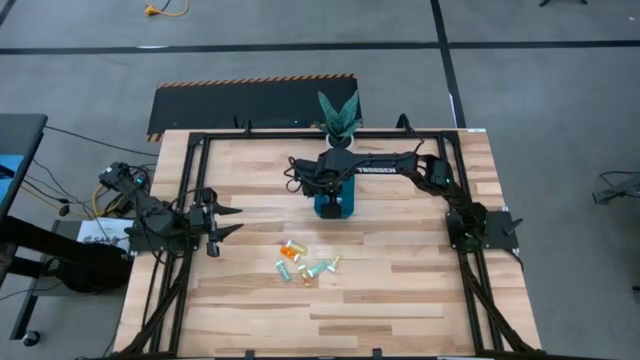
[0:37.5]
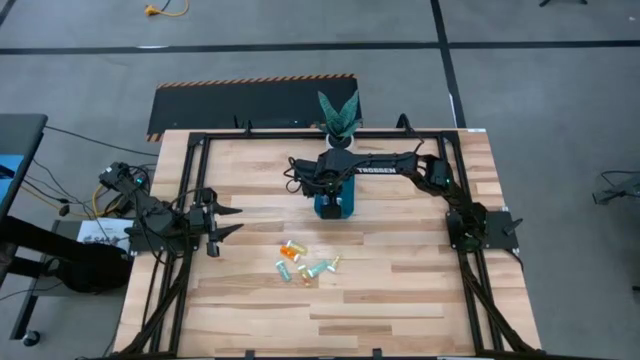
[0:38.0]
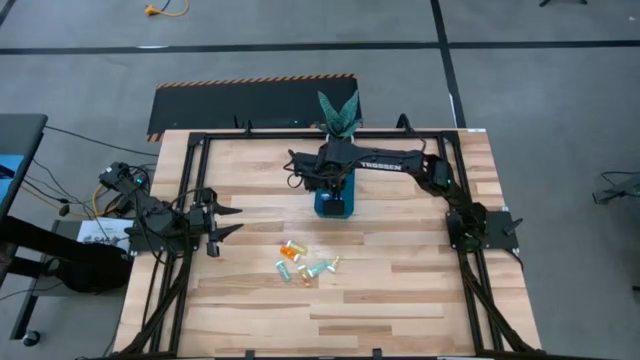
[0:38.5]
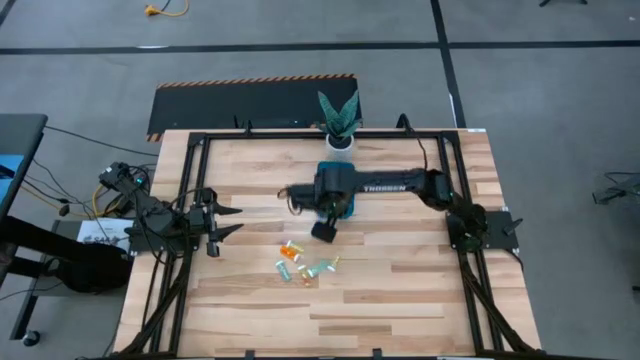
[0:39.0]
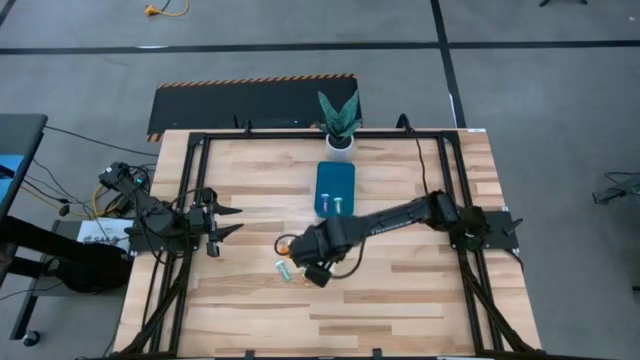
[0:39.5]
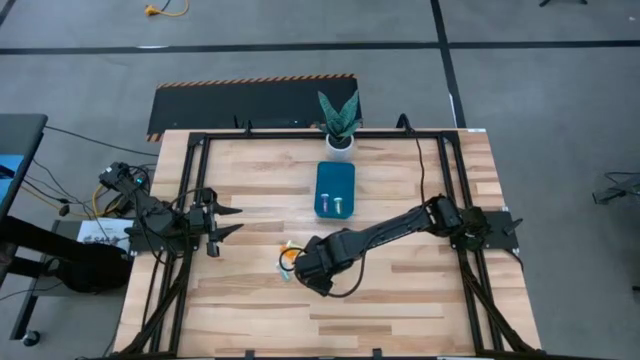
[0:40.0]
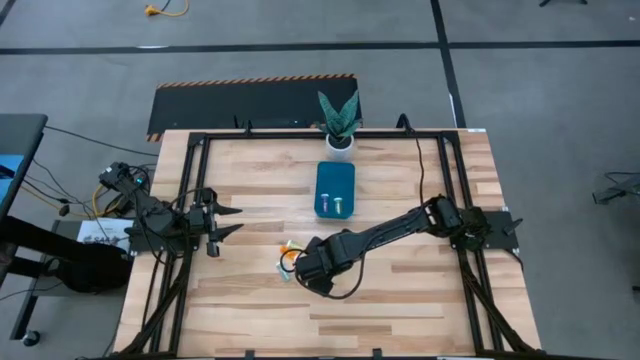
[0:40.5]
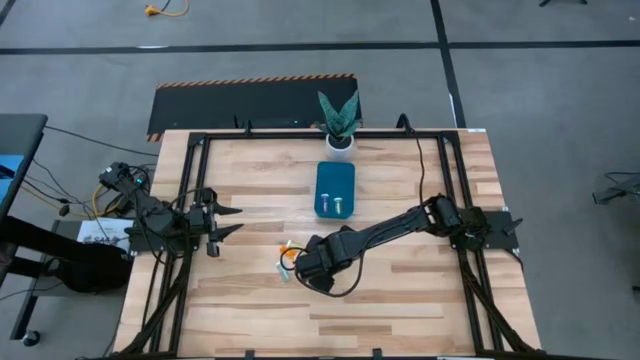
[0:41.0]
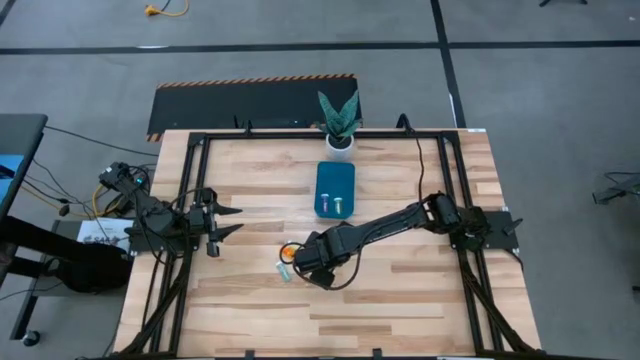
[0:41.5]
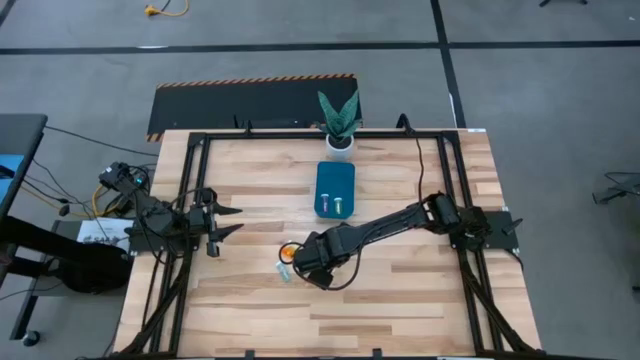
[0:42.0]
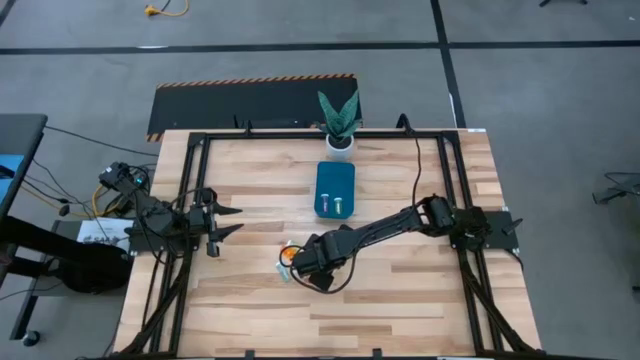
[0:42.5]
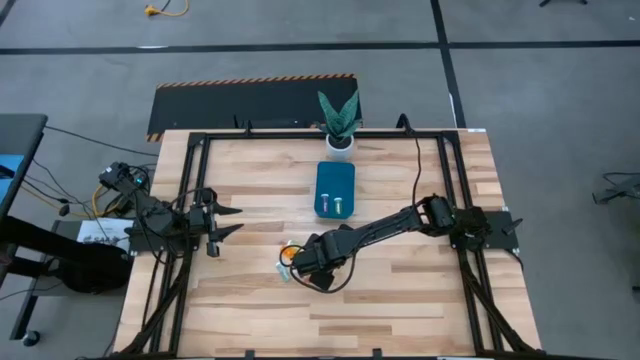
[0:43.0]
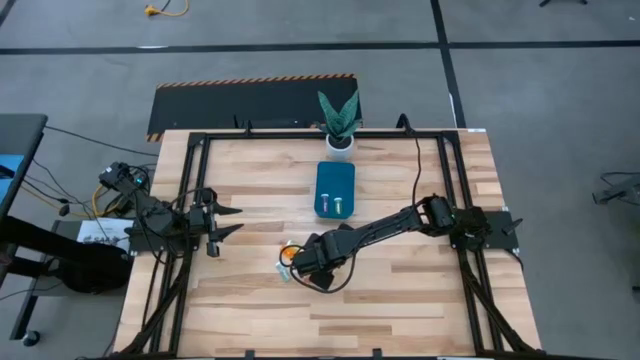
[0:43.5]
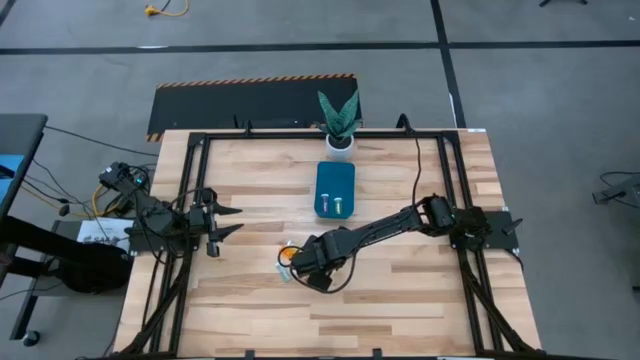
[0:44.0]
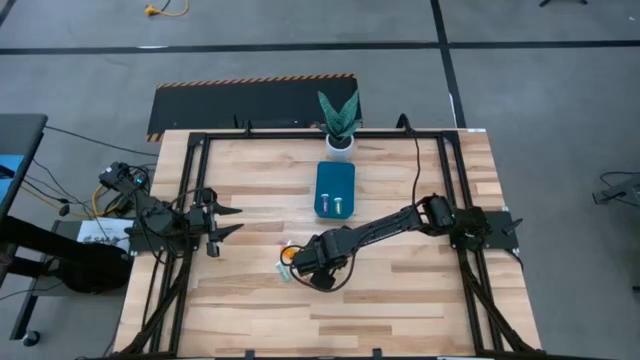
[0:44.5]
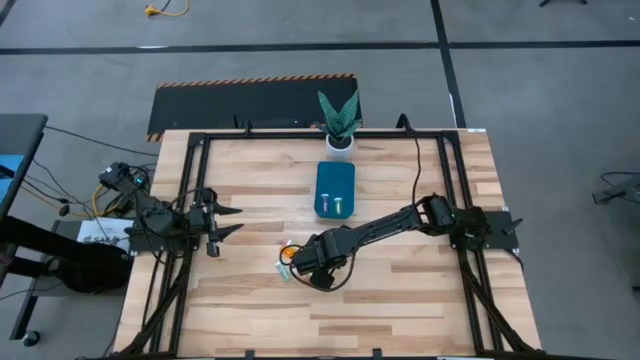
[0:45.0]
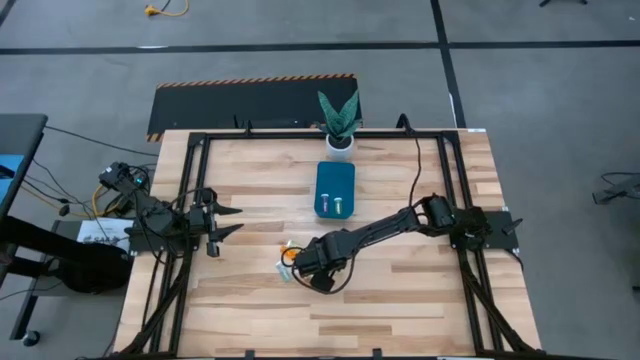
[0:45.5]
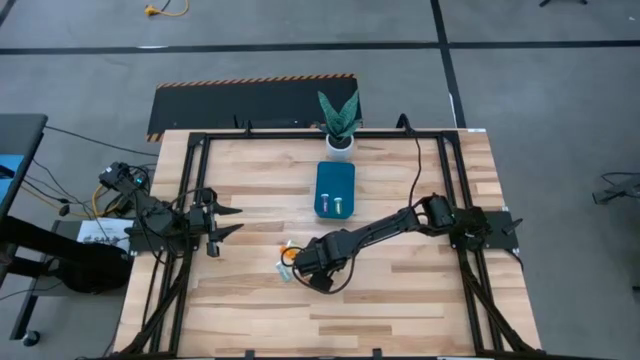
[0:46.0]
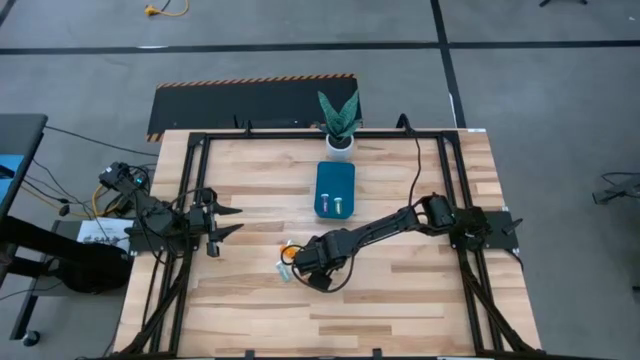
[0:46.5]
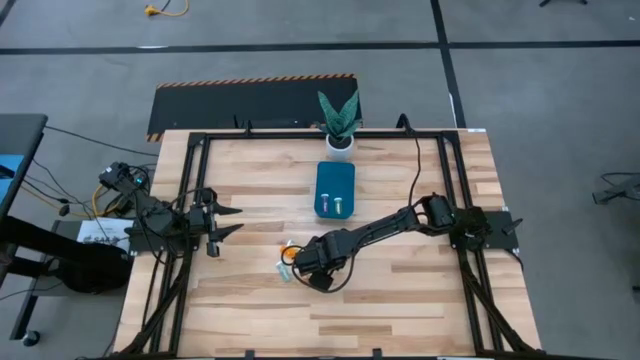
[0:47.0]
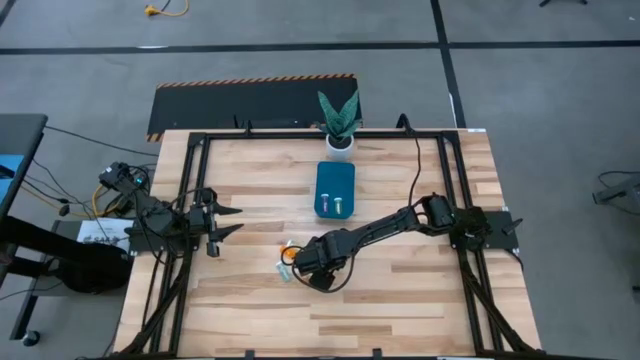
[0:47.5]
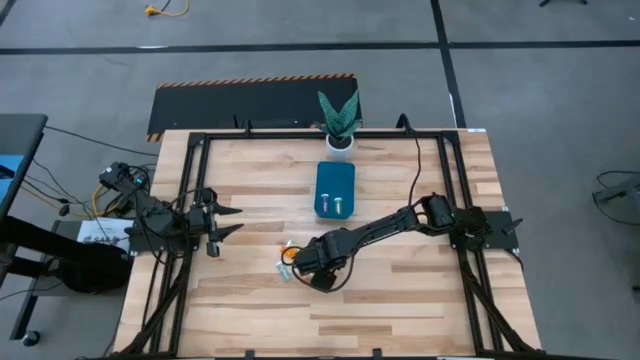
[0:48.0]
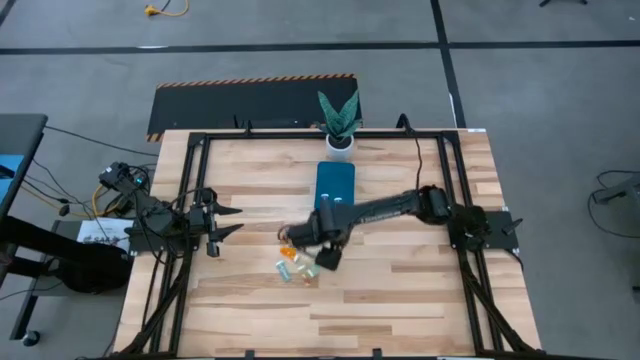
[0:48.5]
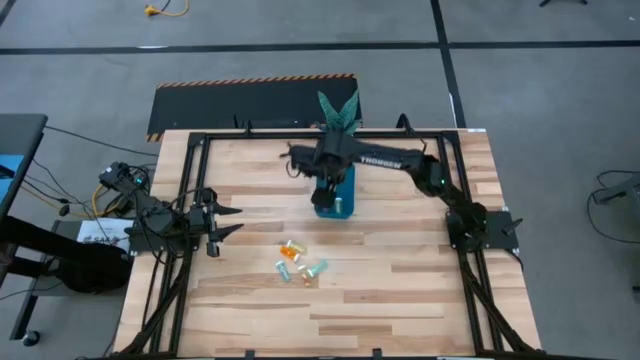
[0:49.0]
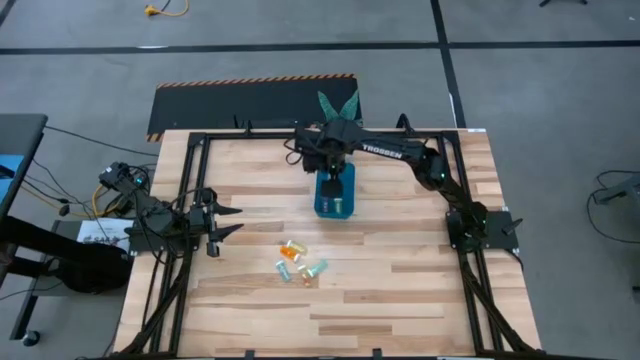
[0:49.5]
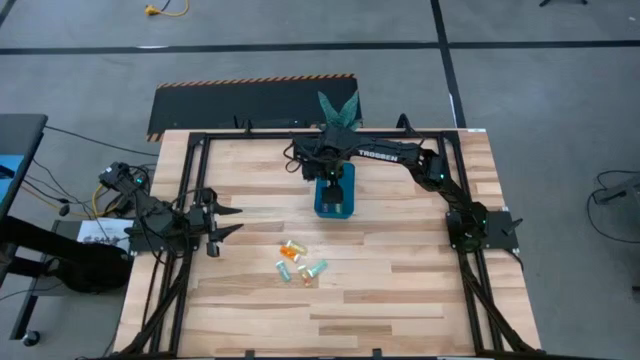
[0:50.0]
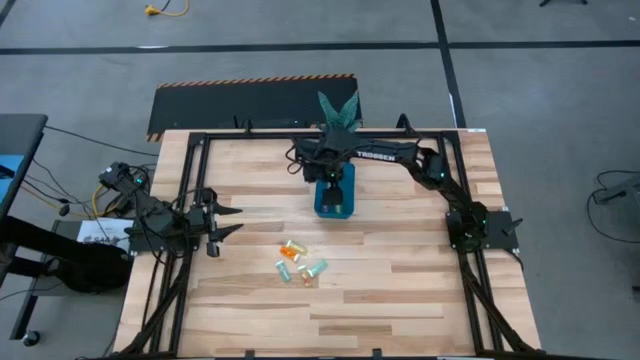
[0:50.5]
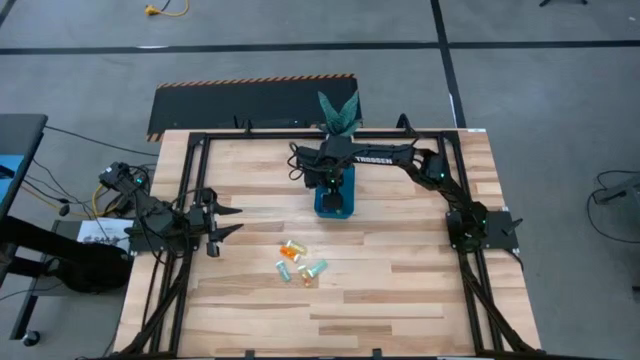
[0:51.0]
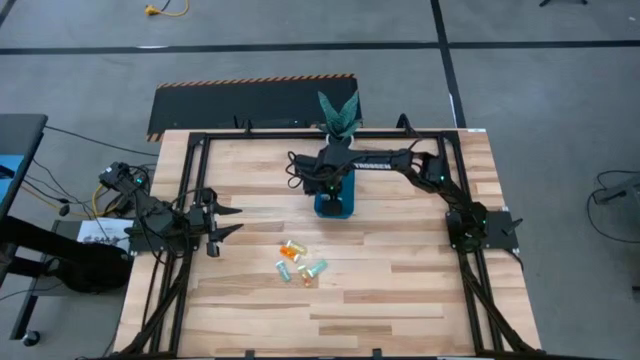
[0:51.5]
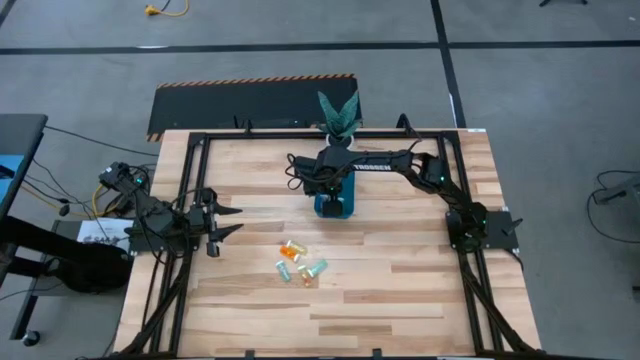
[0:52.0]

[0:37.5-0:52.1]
Task: Pick and place pill bottles into a basket
Put the right yellow pill bottle into the bin
